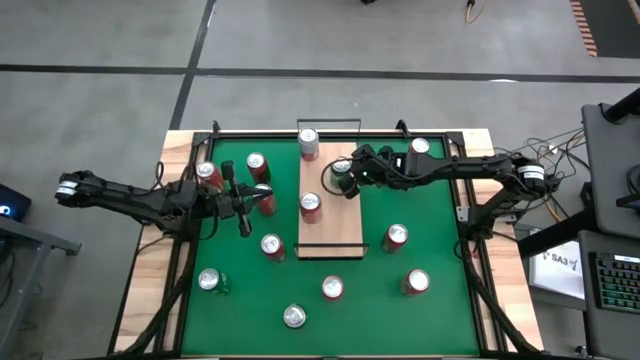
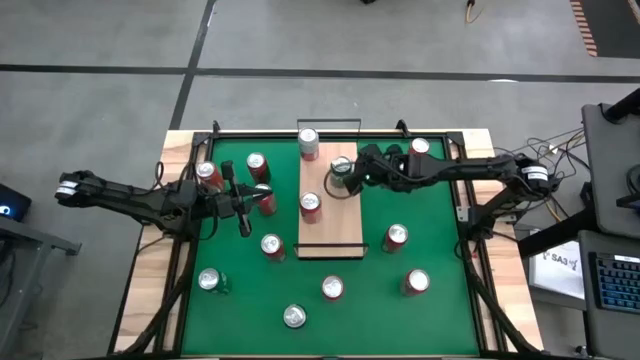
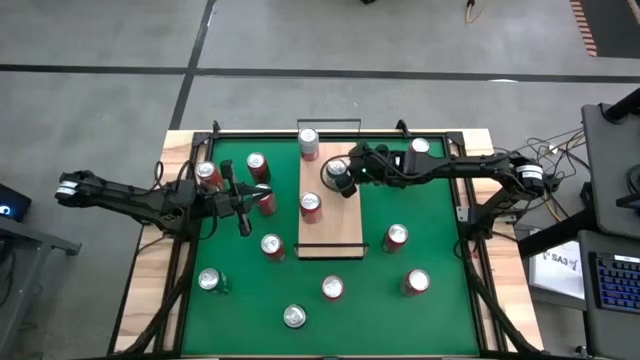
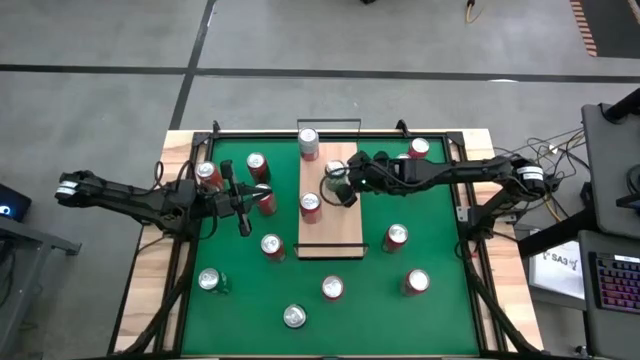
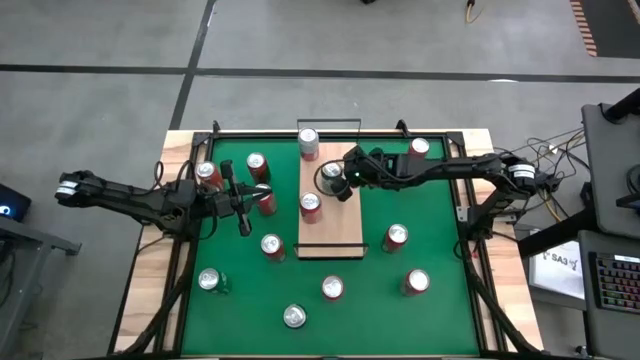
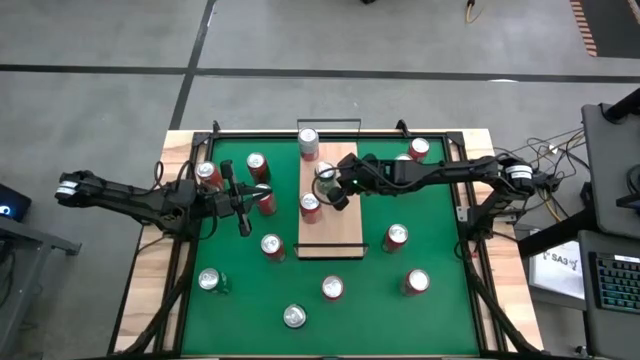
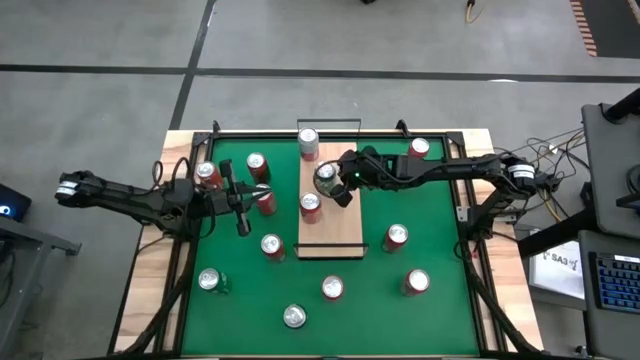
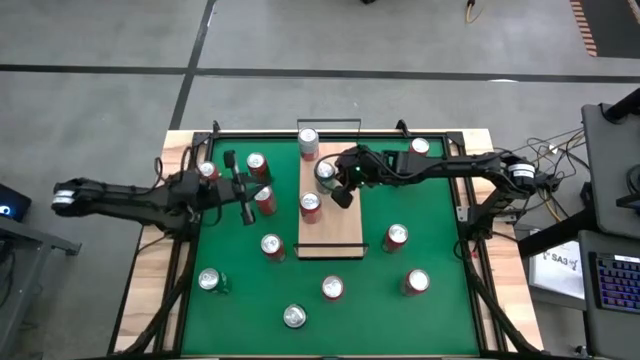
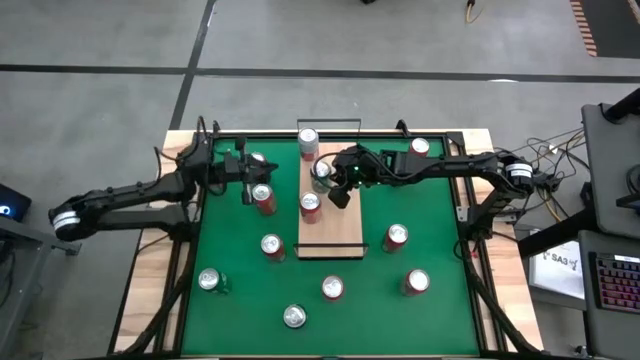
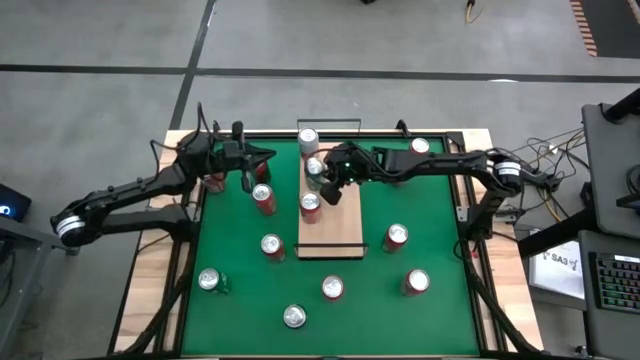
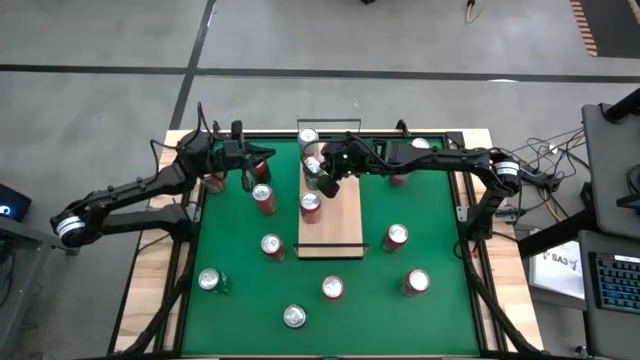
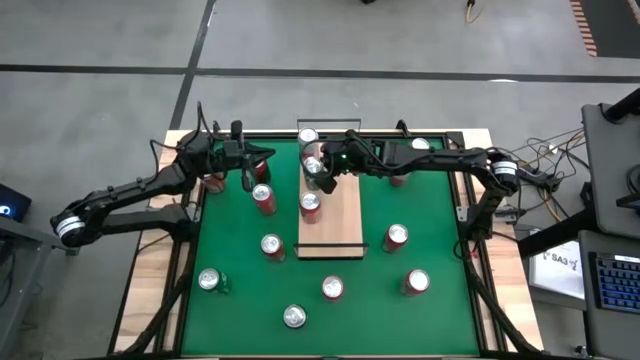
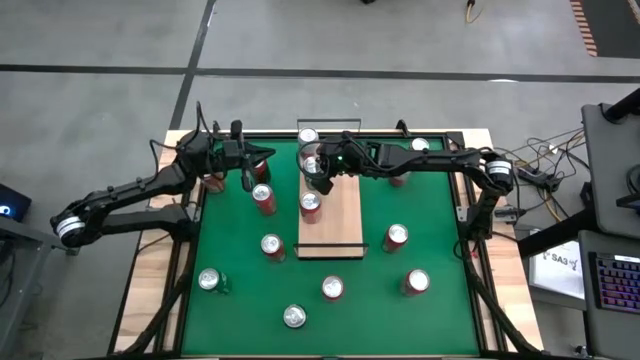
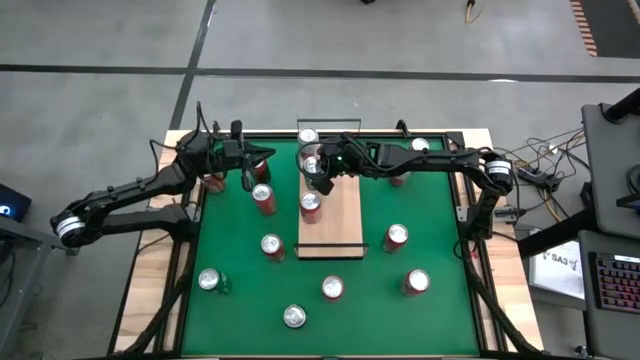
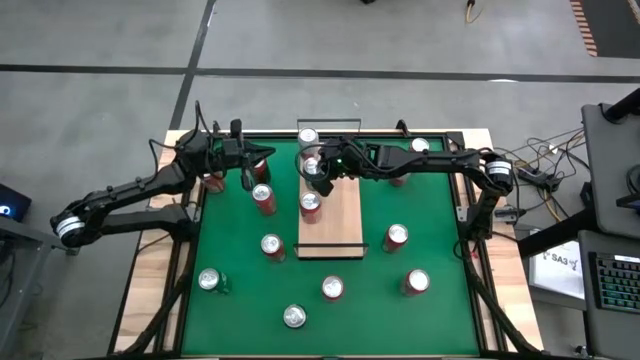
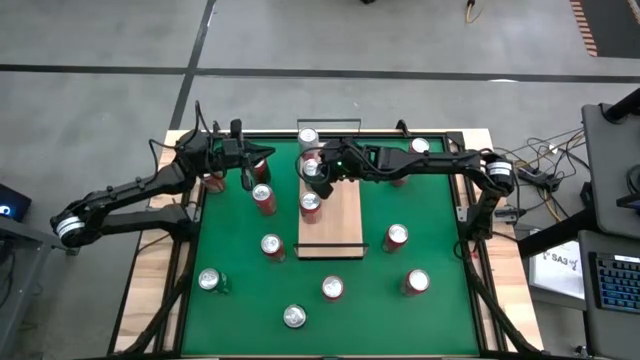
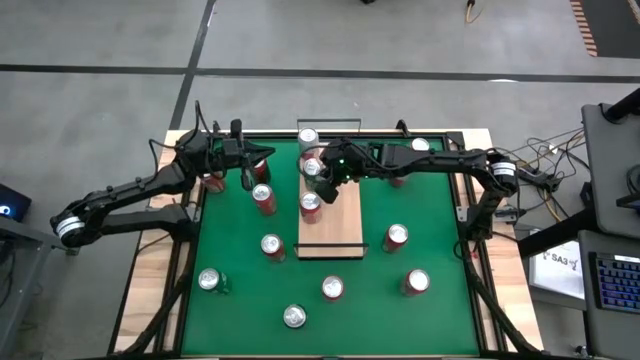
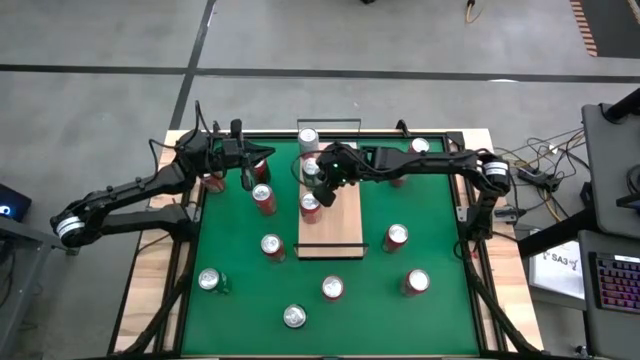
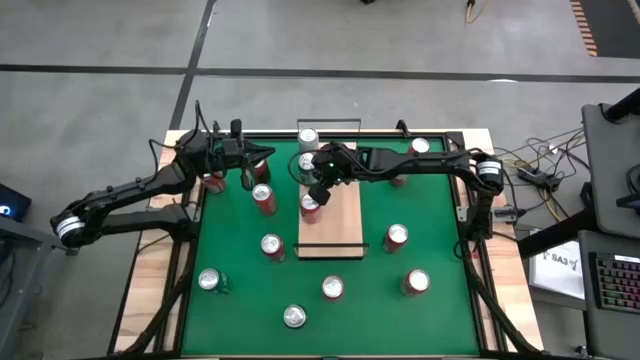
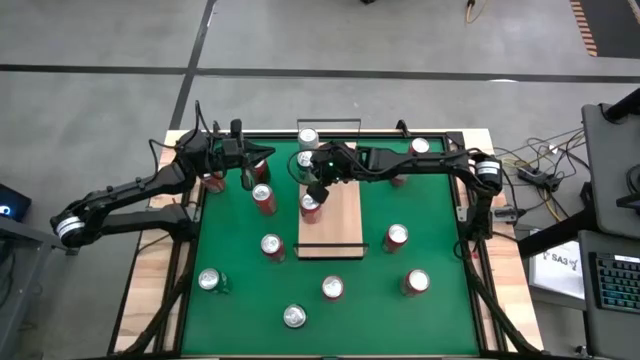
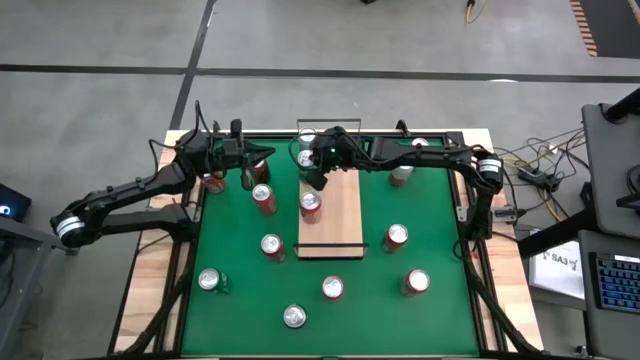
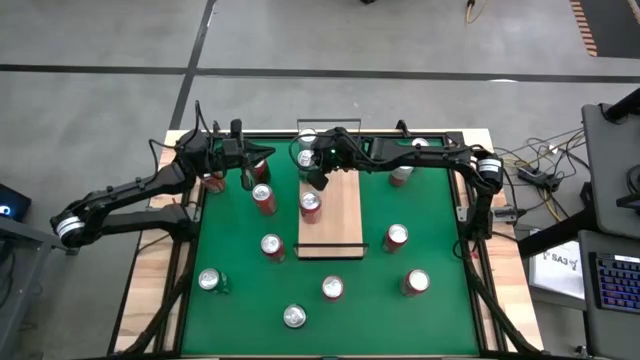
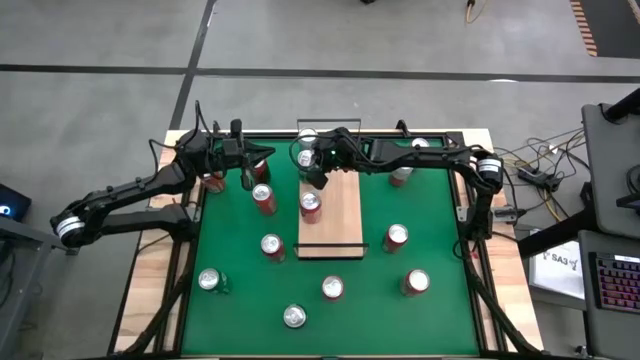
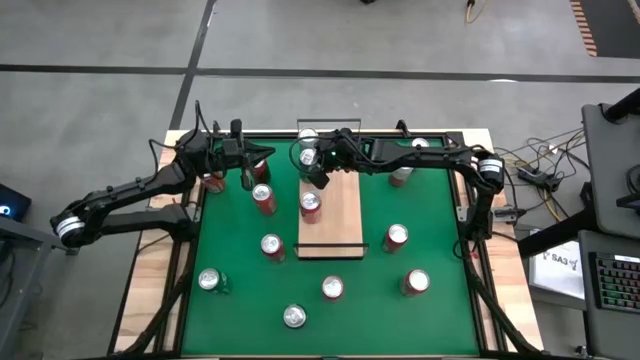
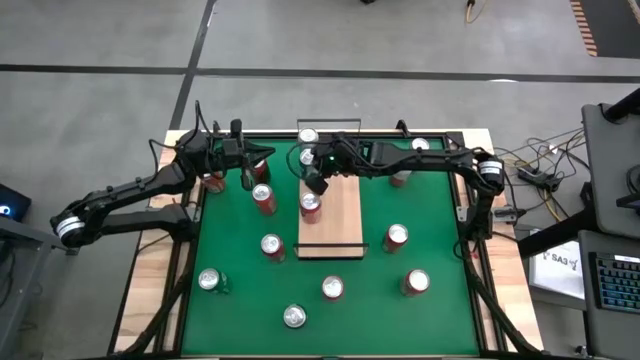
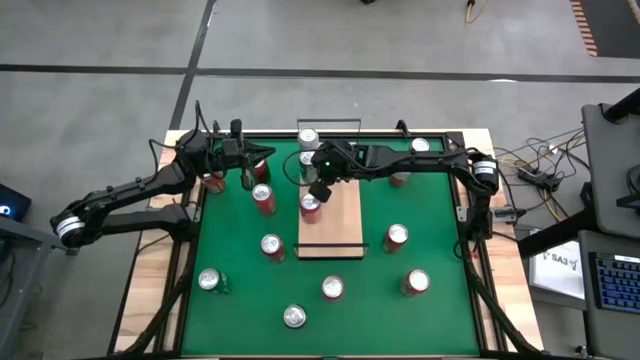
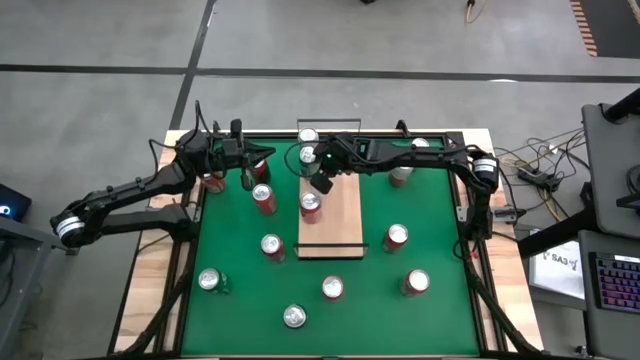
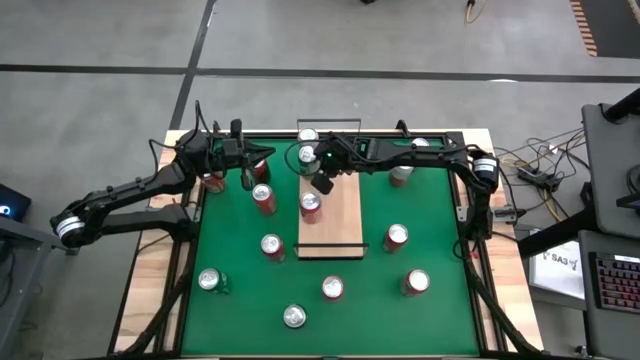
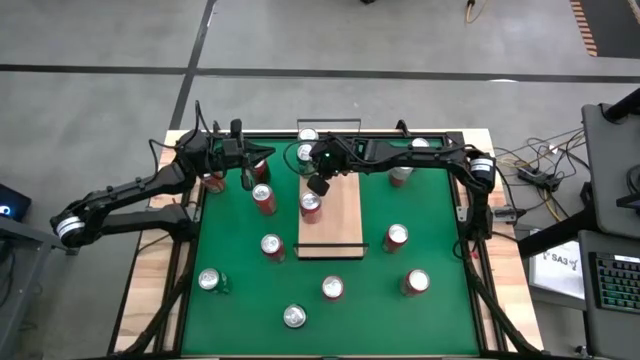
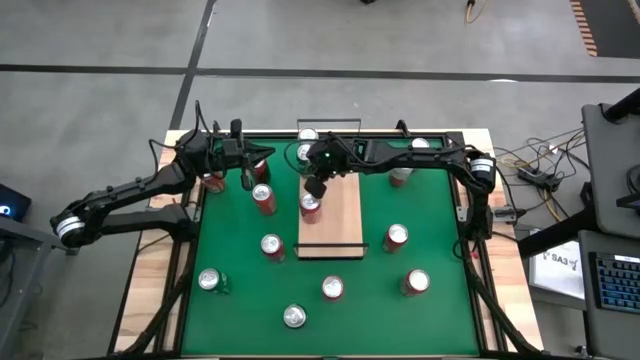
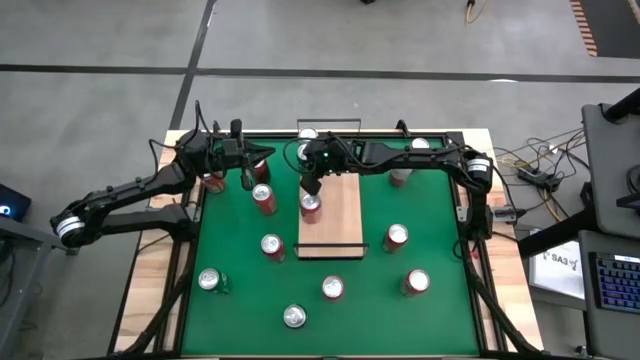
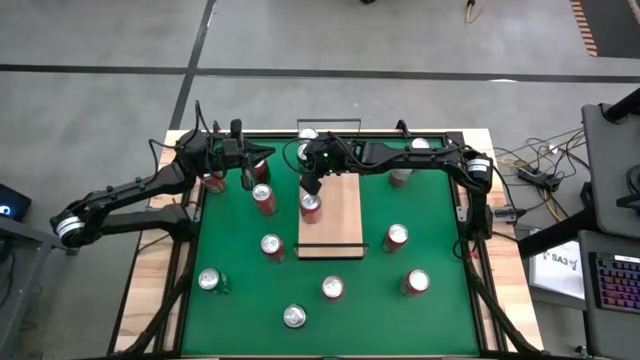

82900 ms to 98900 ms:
Task: Place canned beverage on shelf
Put the green soda can on the shelf

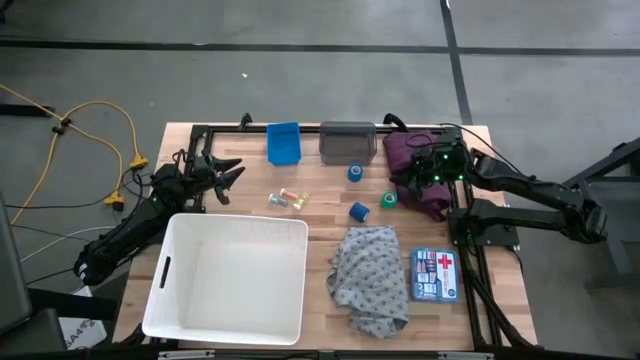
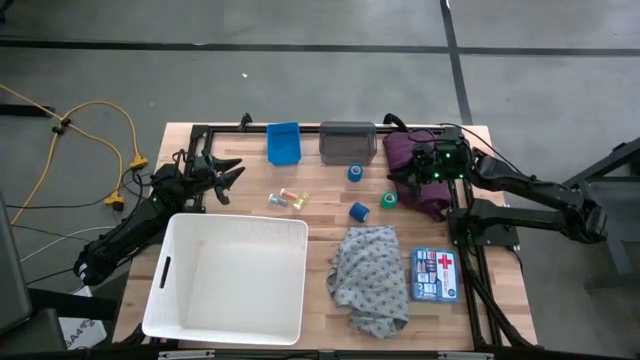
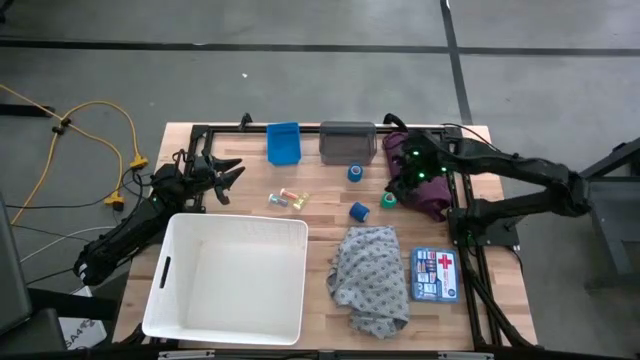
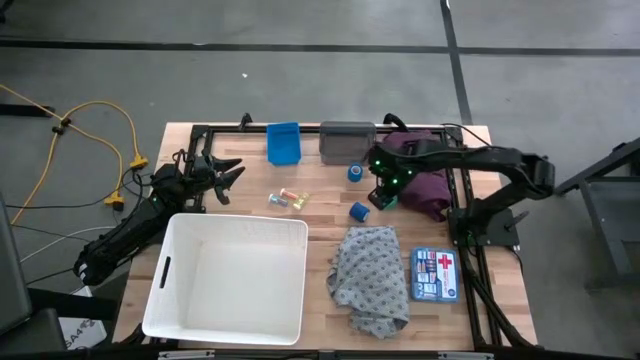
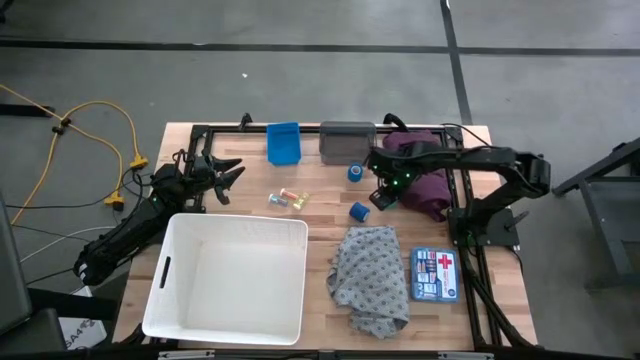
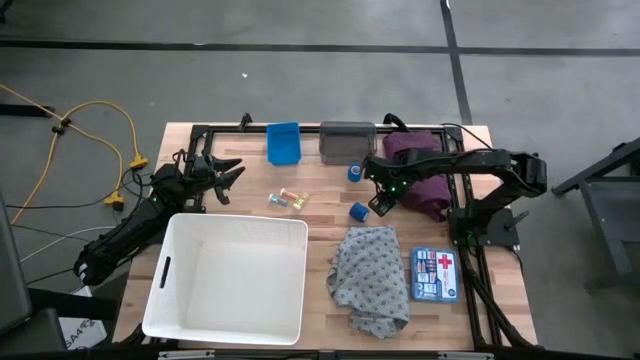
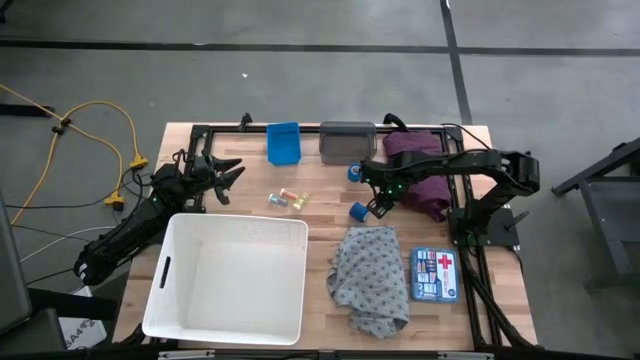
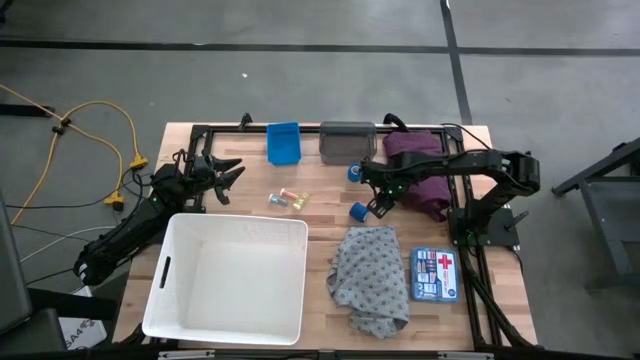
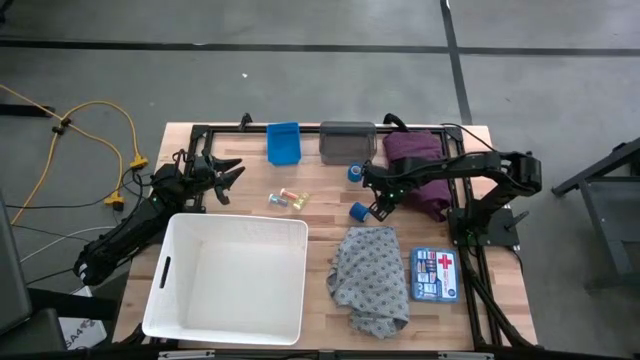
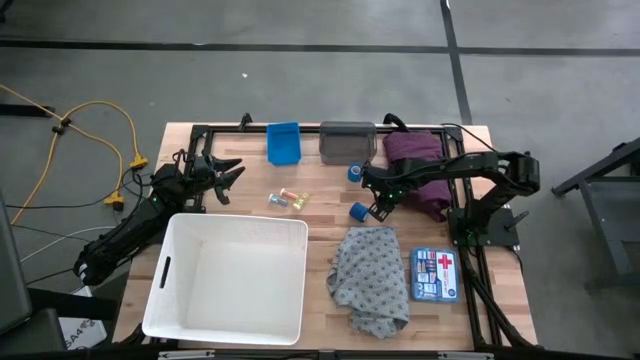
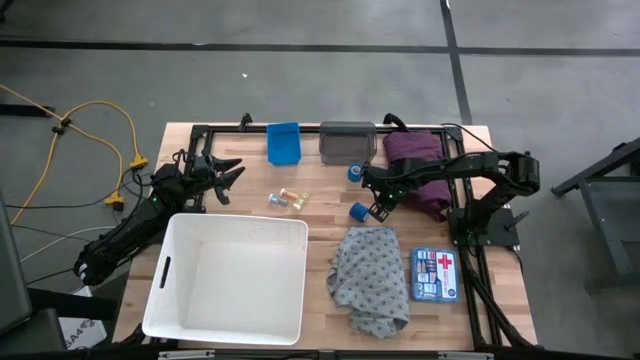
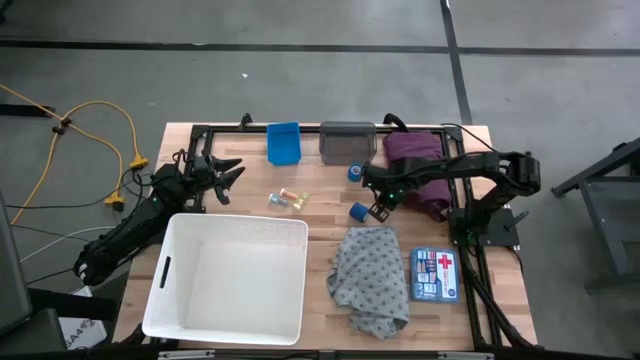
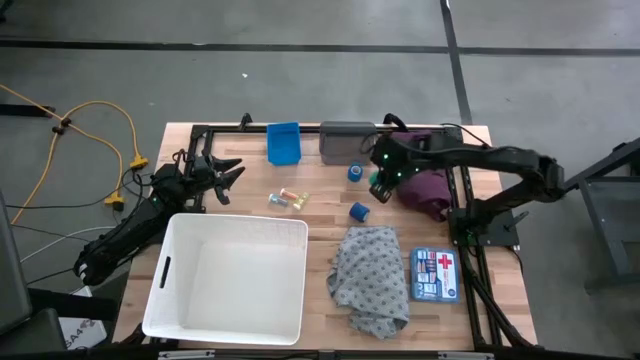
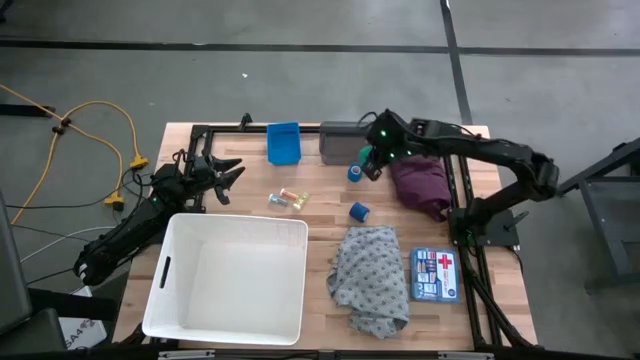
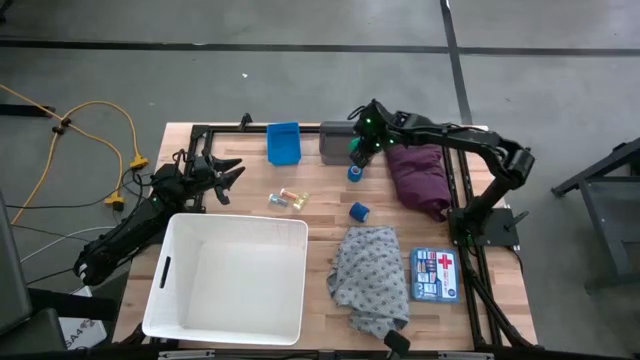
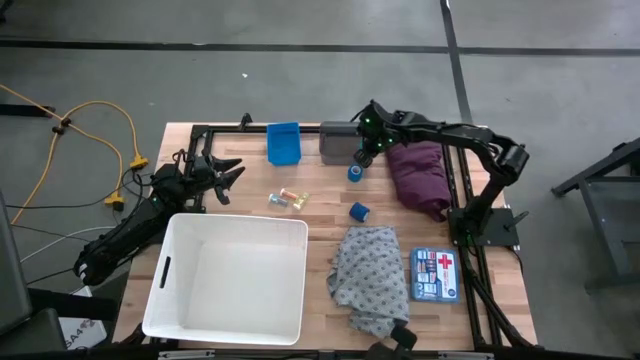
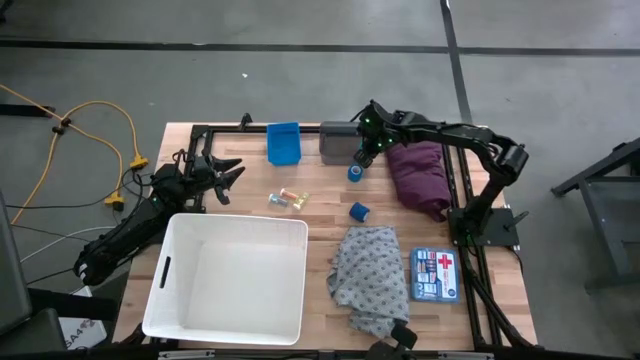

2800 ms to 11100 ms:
Task: Pick & place medical supplies in basket/bin
Put the green bandage into the black bin
